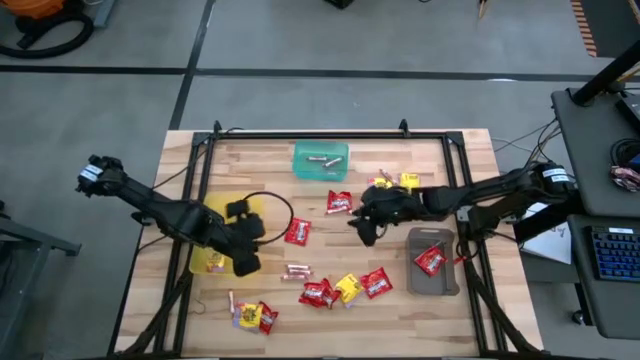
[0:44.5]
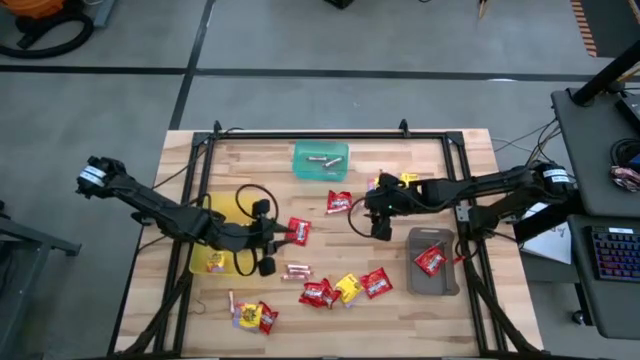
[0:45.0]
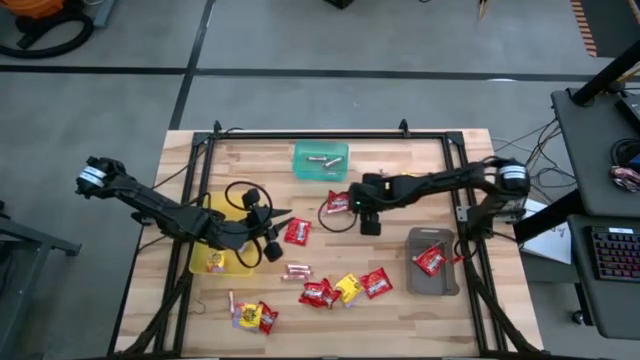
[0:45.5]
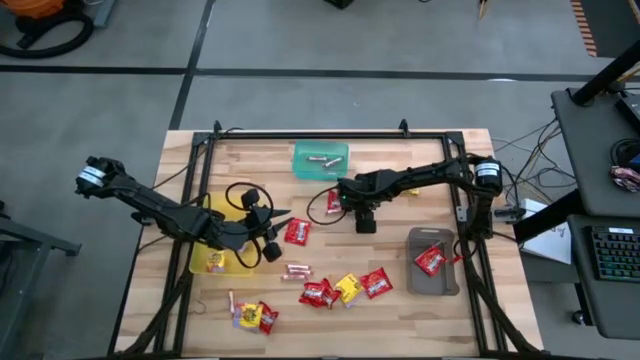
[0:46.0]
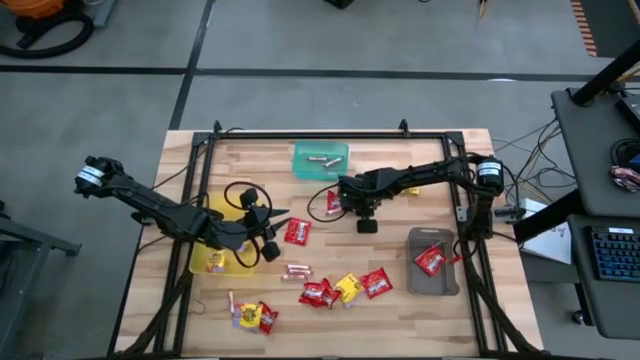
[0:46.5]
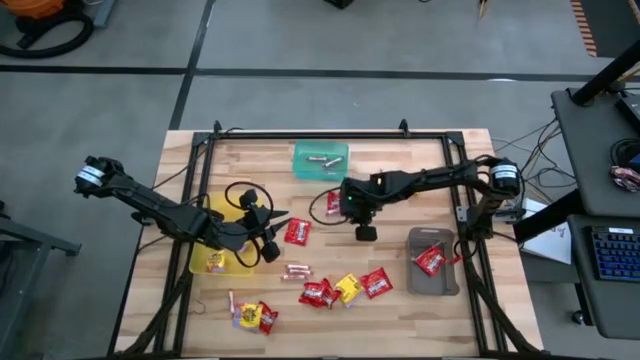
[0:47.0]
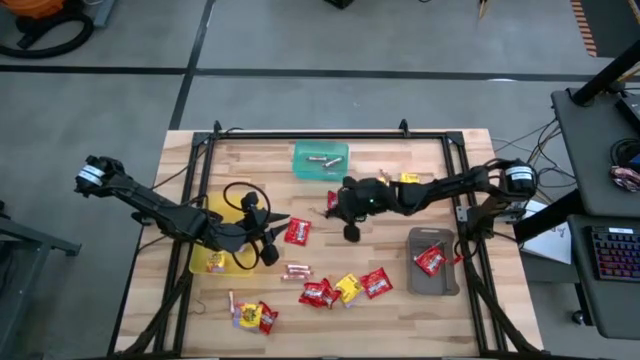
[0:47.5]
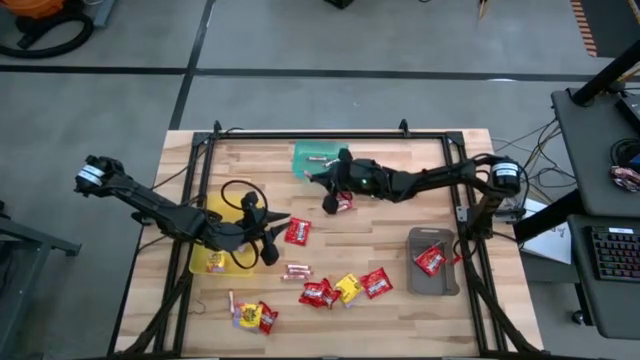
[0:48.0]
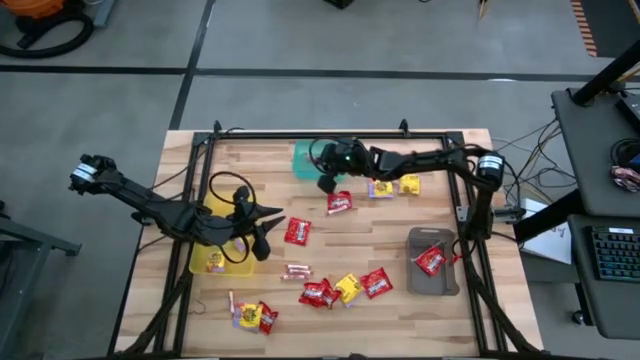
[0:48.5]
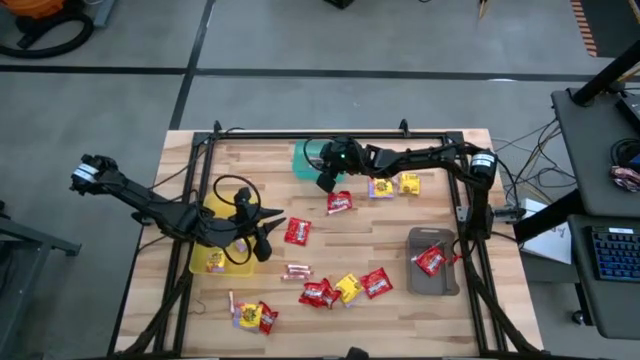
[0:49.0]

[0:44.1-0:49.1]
Task: Sort candy
Put the white candy into the green bin

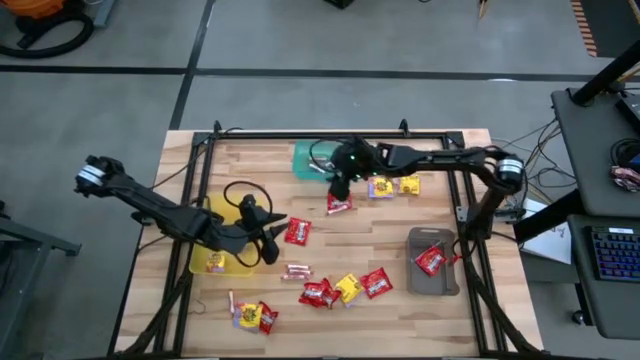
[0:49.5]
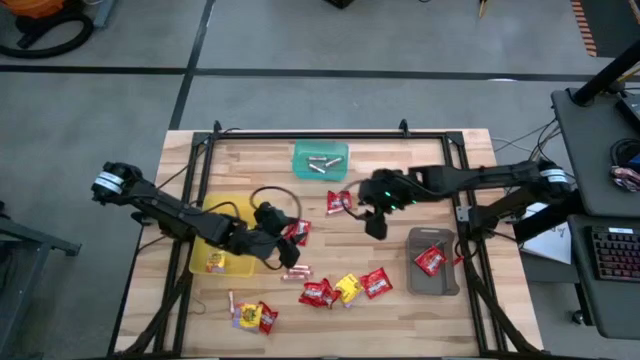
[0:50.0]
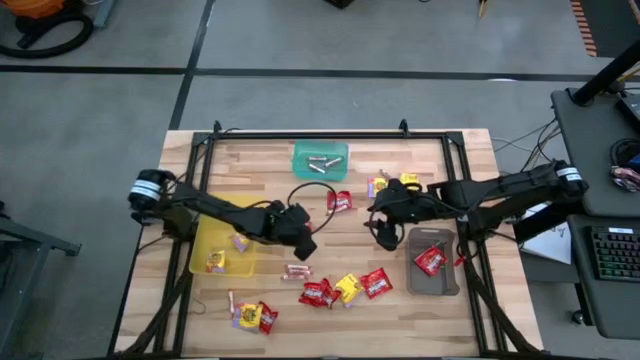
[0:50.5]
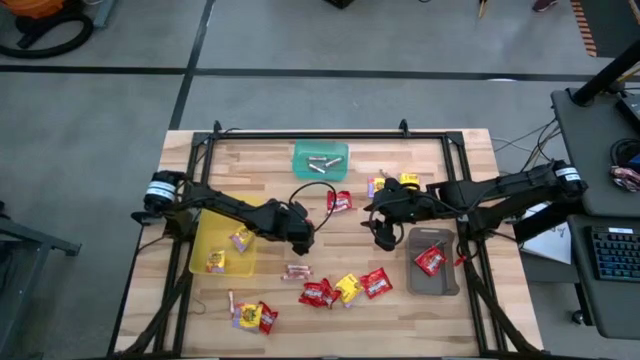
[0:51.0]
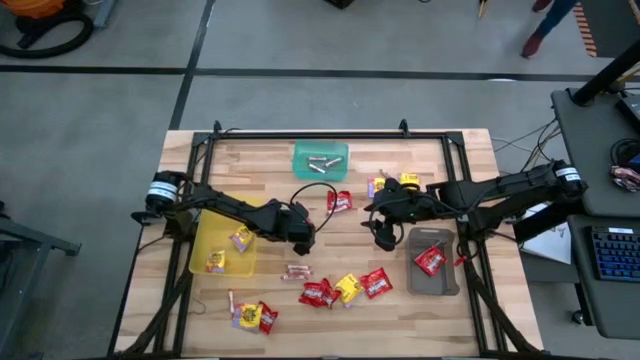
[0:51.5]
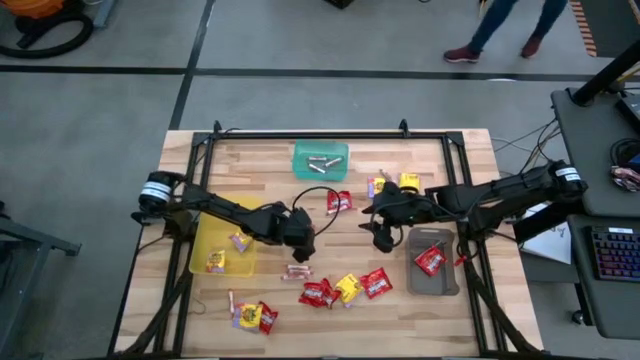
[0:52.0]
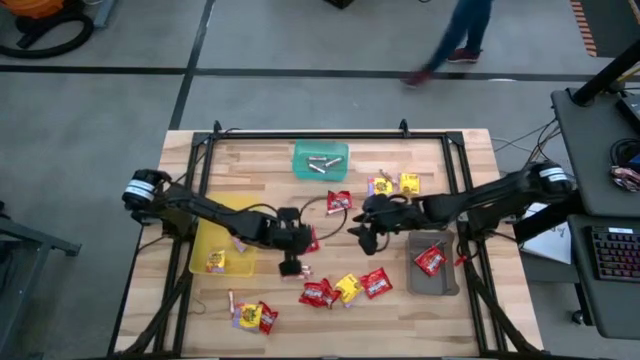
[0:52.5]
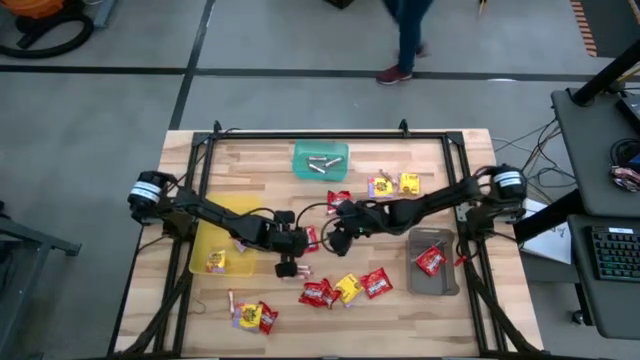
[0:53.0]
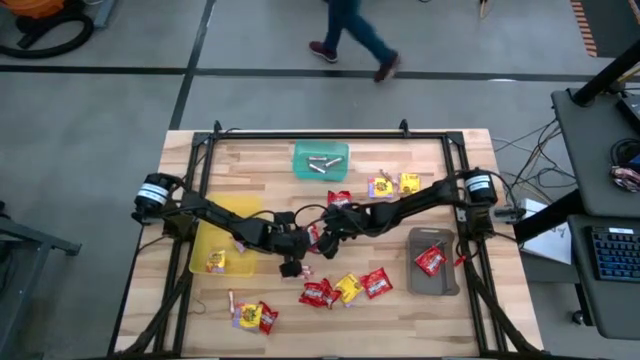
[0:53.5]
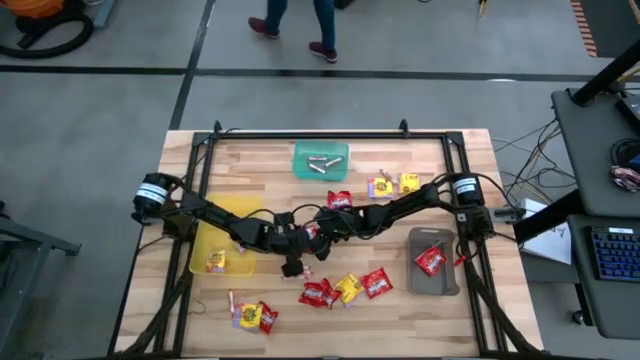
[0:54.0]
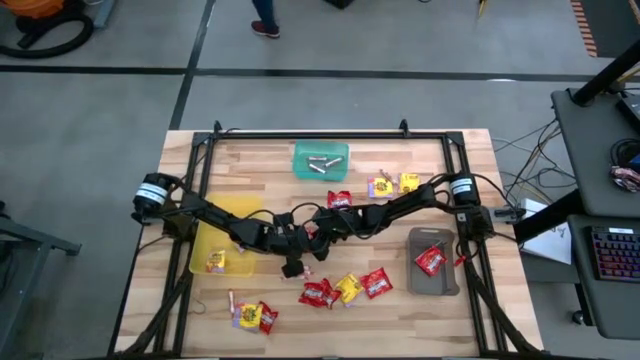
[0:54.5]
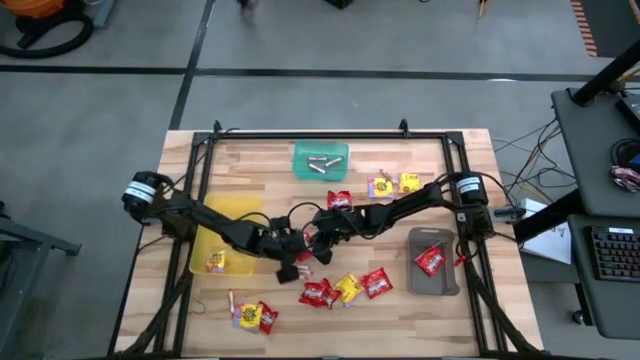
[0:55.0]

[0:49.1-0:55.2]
Put the red candy into the black bin

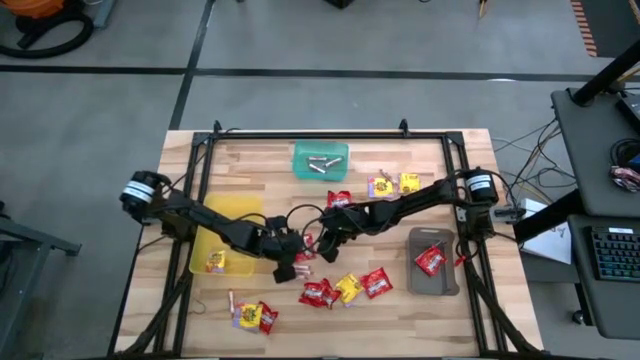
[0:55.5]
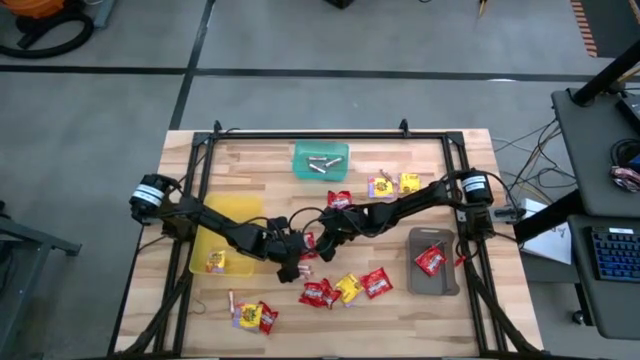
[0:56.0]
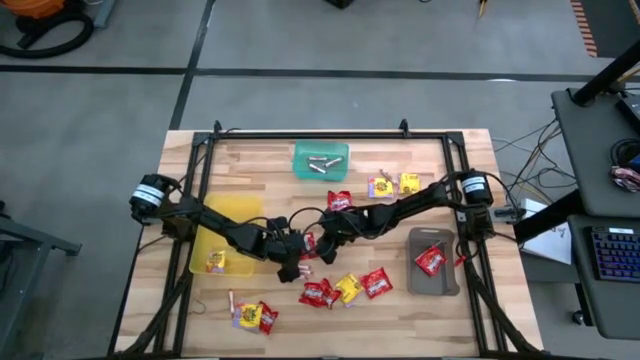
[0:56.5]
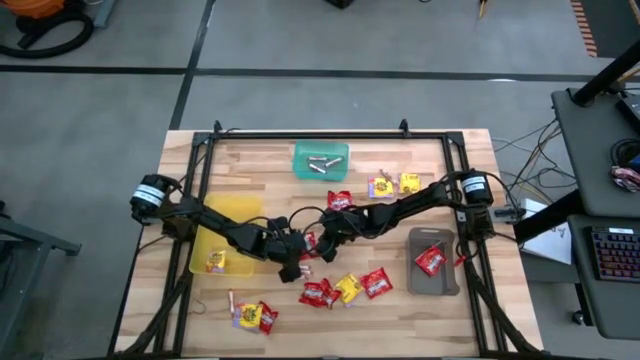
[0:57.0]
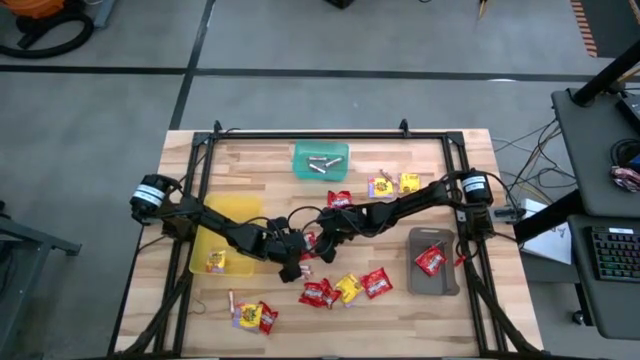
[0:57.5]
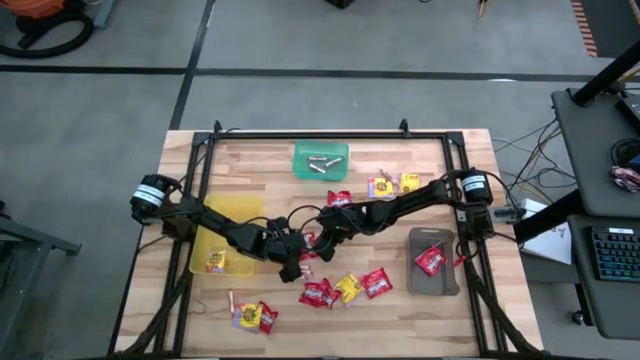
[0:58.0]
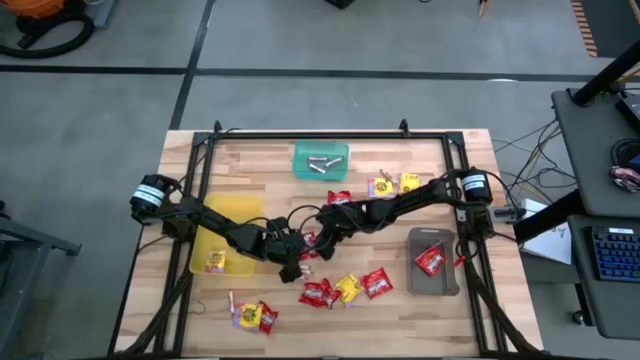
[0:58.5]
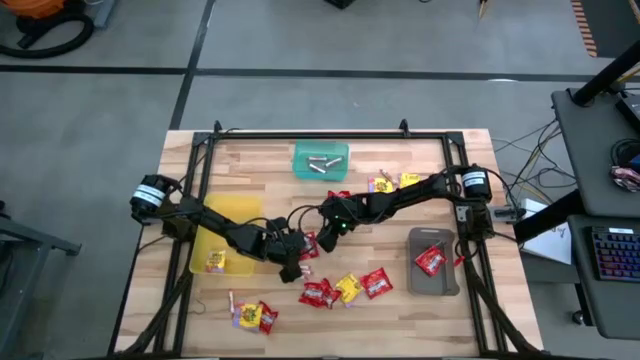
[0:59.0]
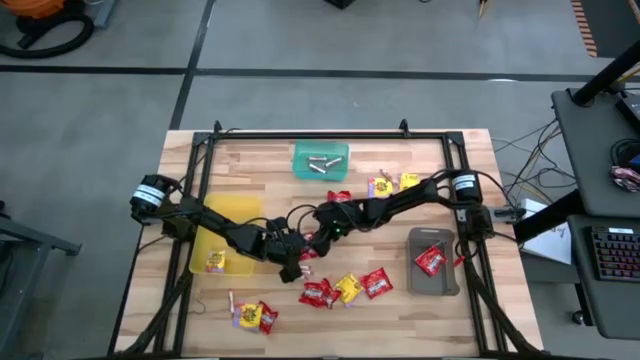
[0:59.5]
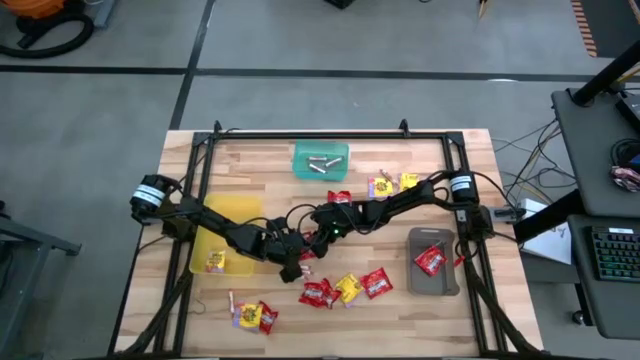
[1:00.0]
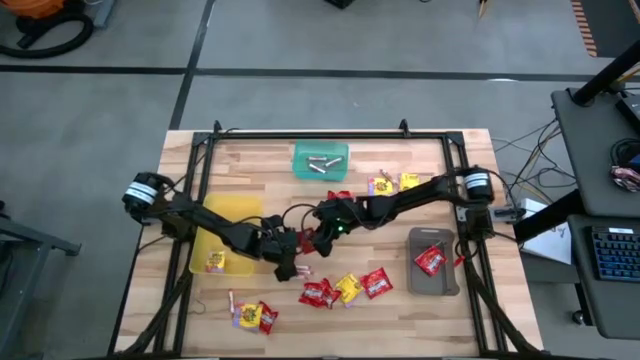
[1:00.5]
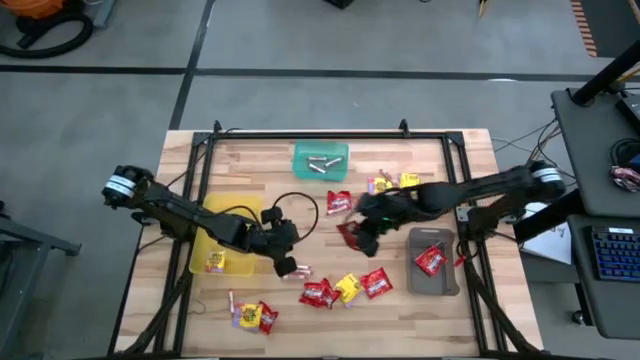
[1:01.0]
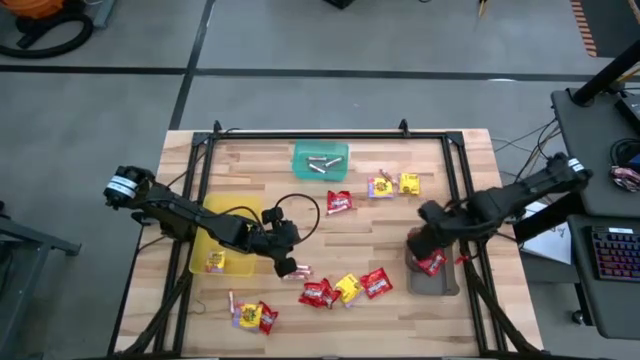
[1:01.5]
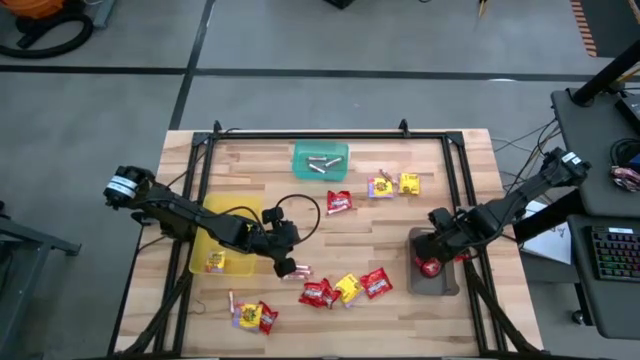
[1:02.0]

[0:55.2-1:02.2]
Put the red candy into the black bin

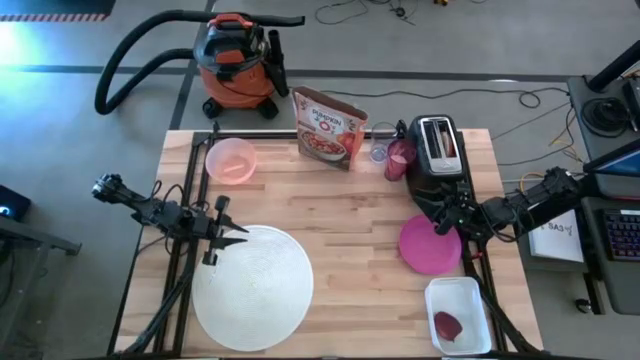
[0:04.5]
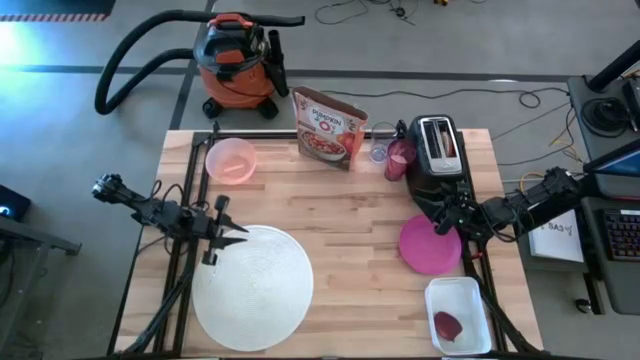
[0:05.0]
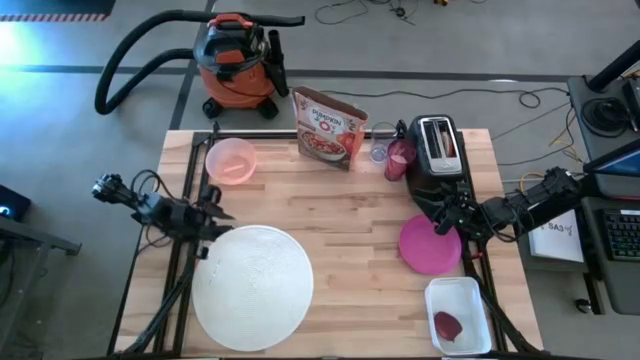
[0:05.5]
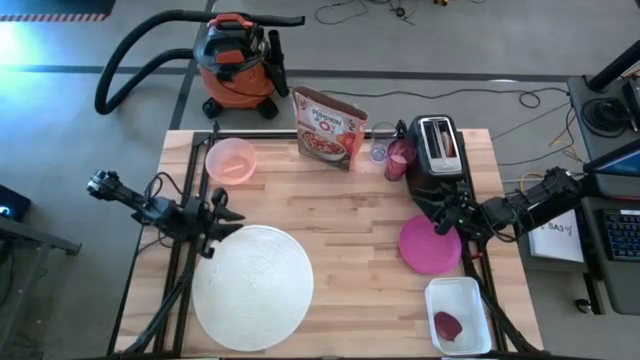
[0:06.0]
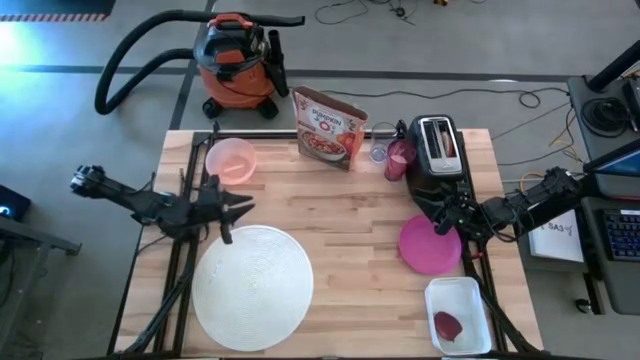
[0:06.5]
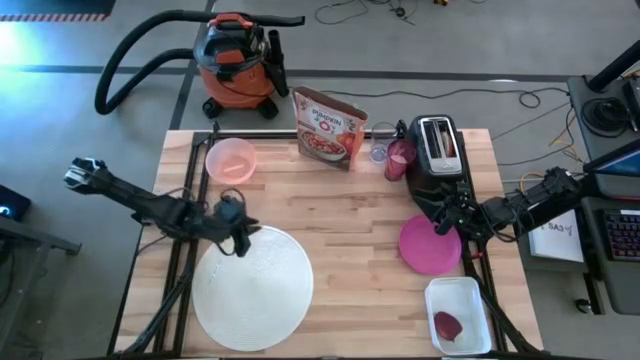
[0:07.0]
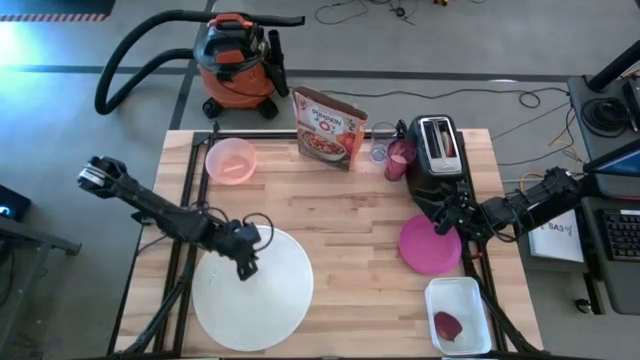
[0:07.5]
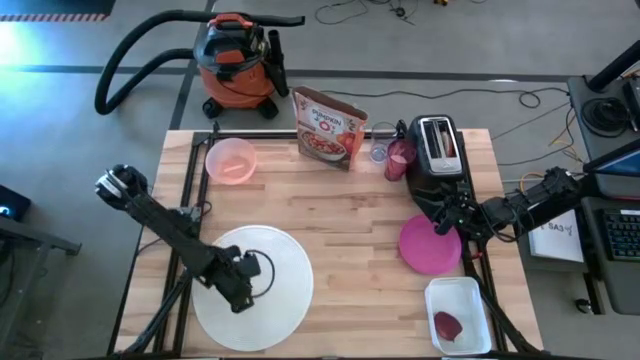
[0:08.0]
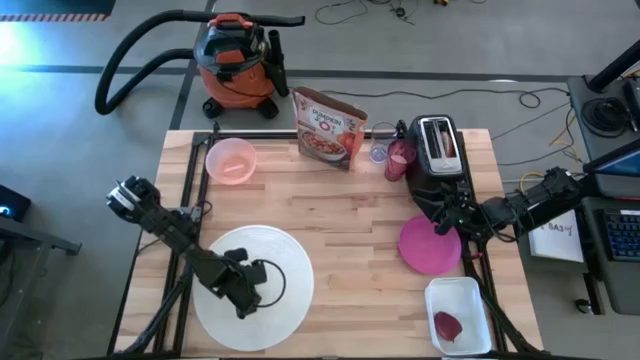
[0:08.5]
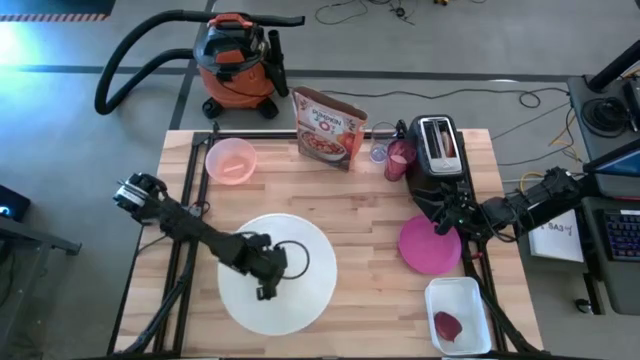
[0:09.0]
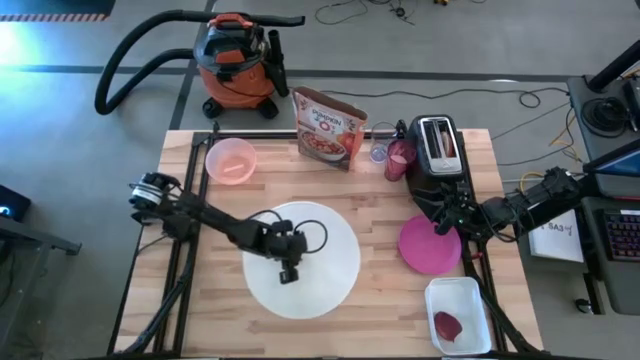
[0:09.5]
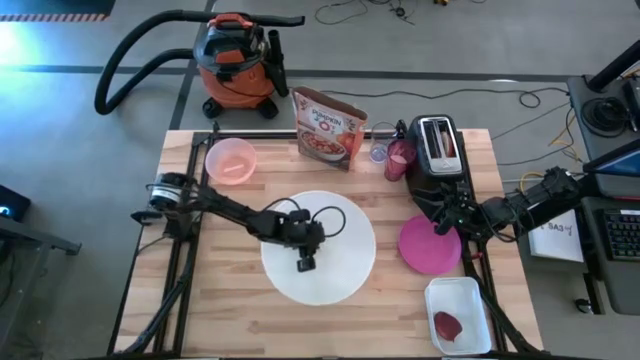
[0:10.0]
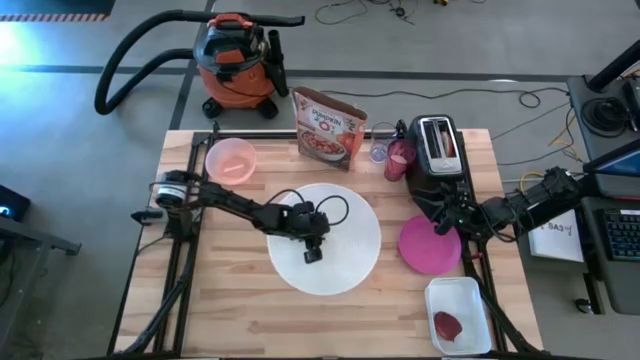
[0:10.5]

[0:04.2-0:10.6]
Task: Arrange a breakfast setting
Move the white table mat to the center of the table
